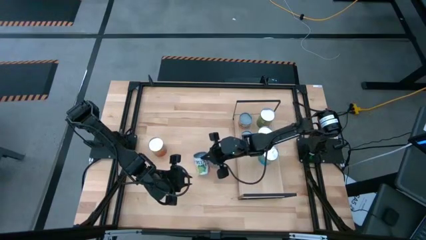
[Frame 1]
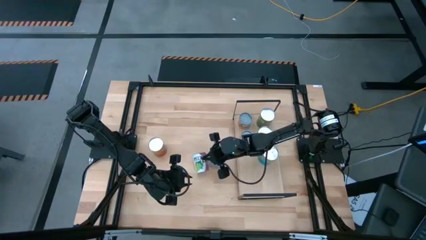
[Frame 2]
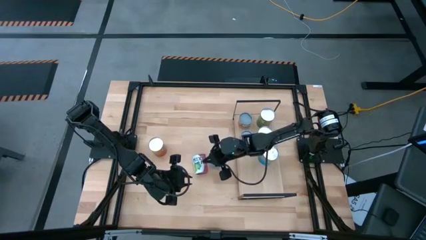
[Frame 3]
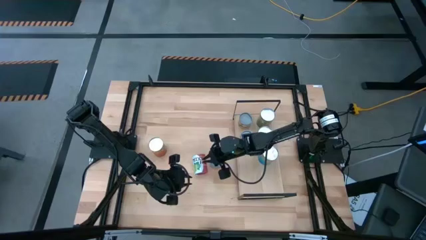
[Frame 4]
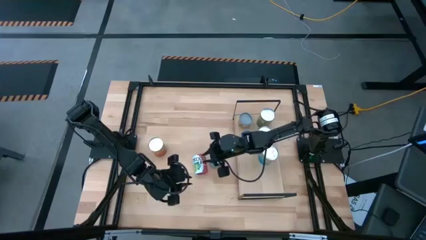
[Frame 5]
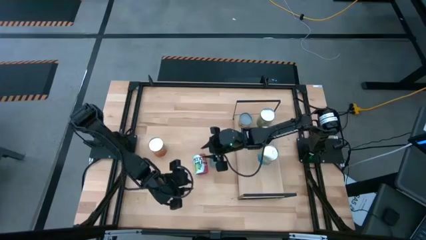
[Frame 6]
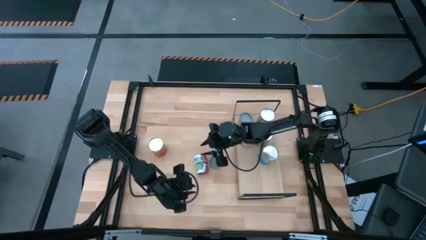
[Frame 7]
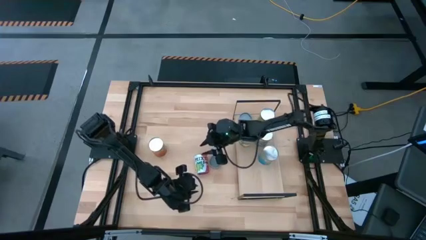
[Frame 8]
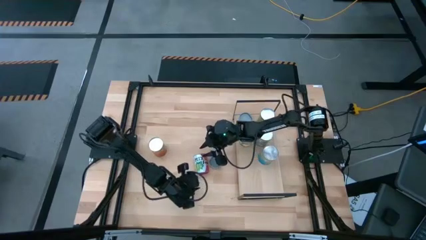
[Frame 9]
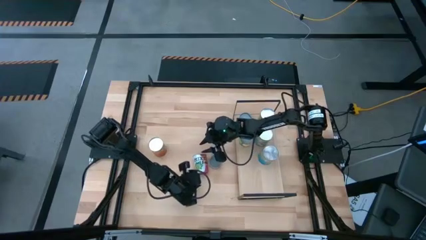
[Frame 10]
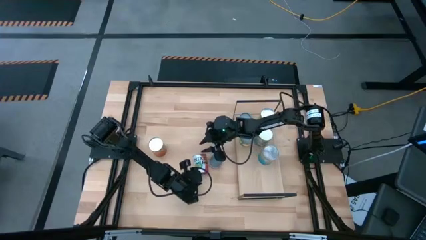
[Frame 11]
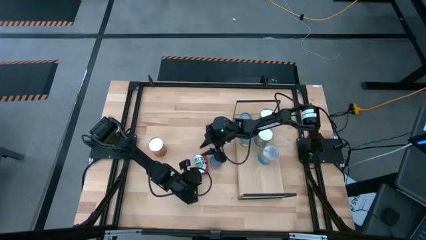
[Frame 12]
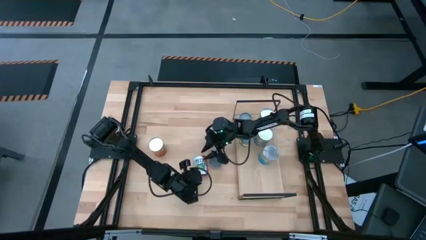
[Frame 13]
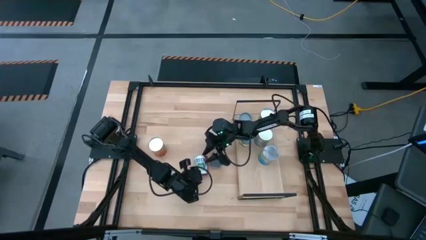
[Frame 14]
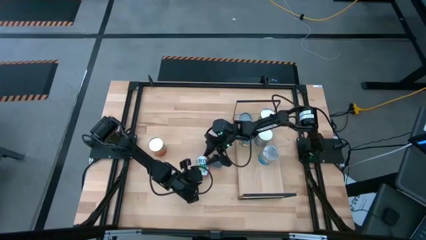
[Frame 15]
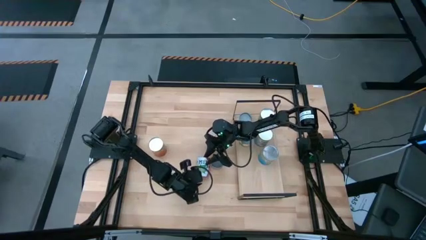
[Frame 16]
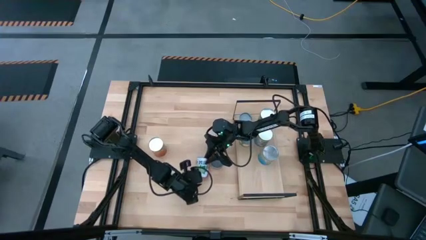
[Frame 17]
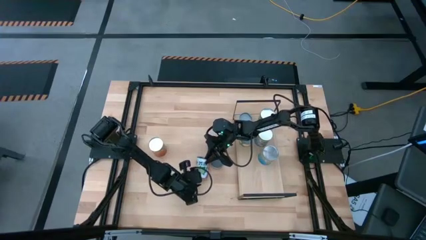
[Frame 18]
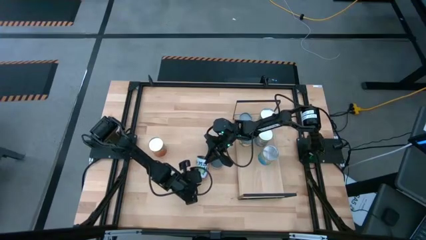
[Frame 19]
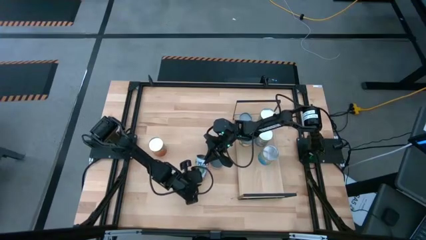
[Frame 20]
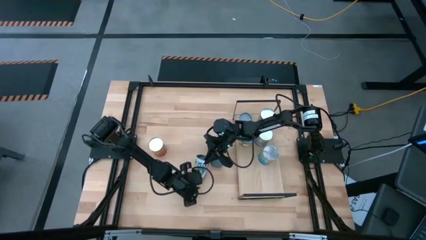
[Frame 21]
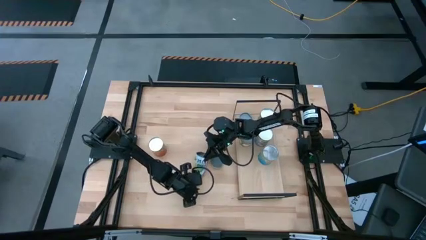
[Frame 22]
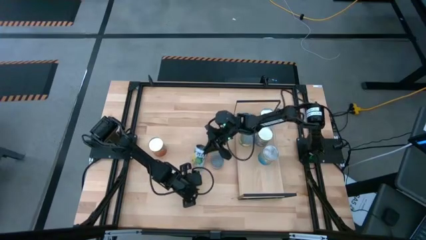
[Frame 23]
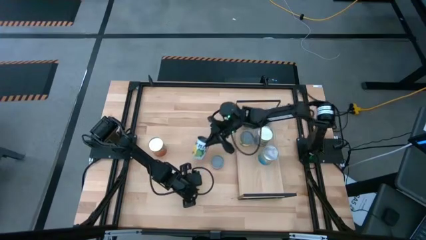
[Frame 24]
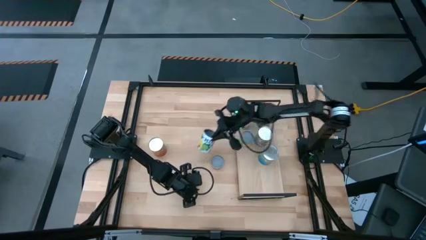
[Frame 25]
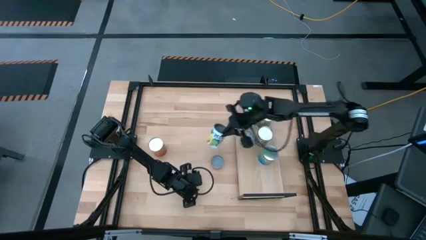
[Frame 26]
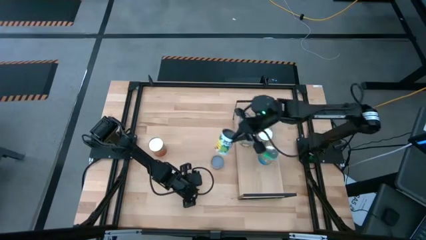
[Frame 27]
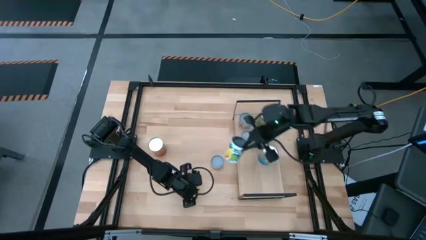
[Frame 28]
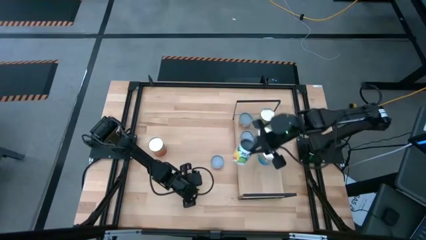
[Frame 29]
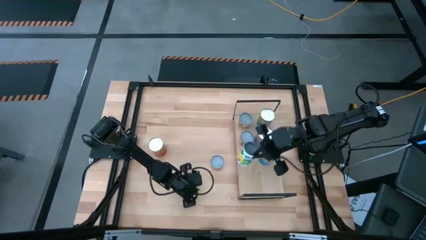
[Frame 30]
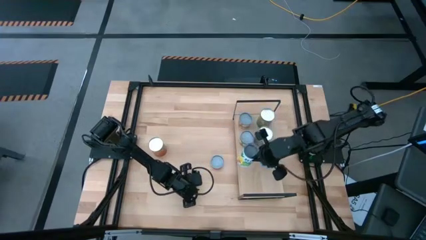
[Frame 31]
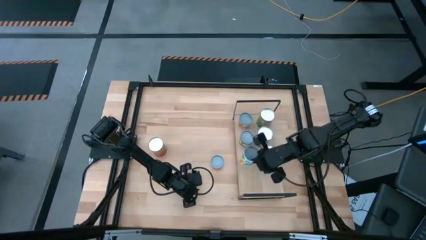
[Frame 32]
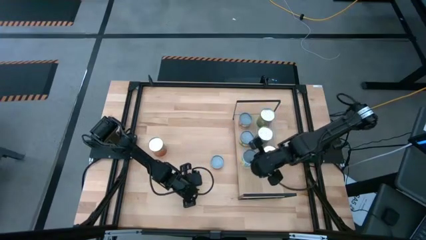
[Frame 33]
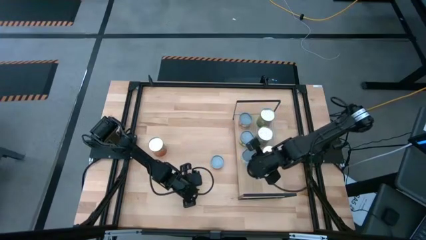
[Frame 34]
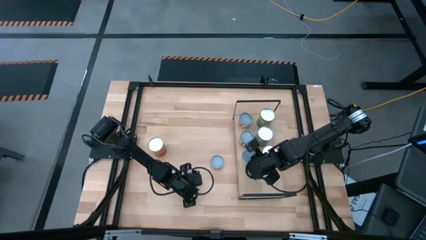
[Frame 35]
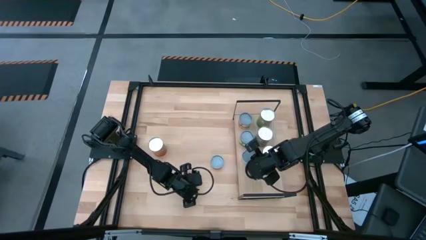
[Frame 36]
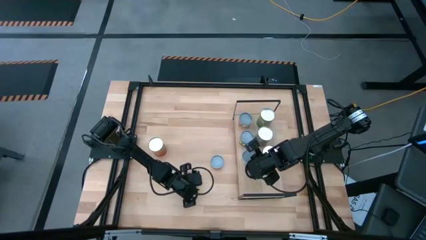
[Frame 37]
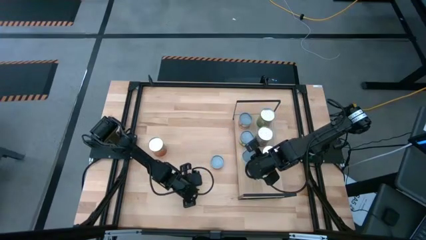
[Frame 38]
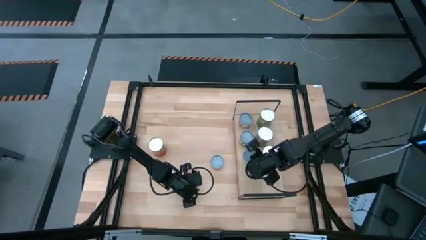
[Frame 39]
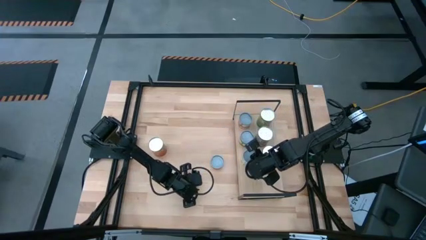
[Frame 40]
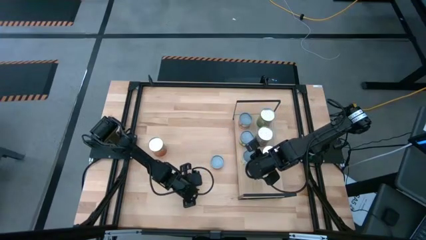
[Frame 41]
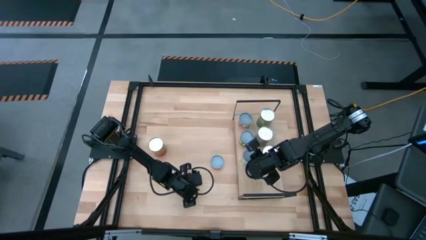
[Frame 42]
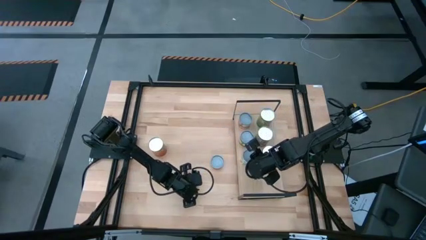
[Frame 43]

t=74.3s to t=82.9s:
Task: Pick and place cans onto a shelf
Put the canned mixed fruits on the shelf

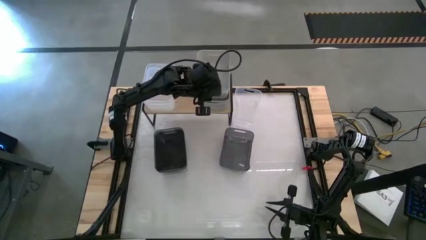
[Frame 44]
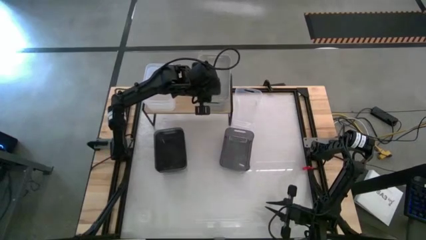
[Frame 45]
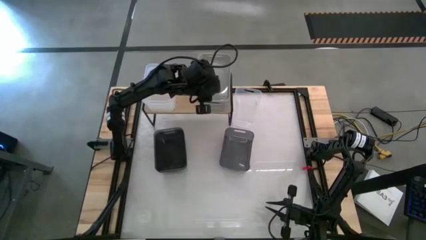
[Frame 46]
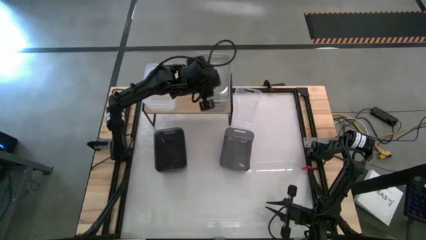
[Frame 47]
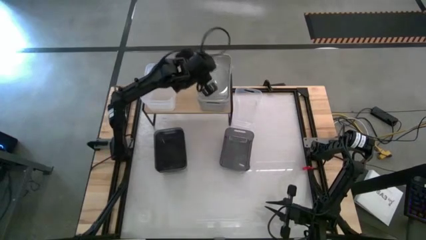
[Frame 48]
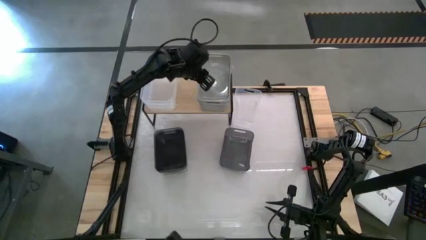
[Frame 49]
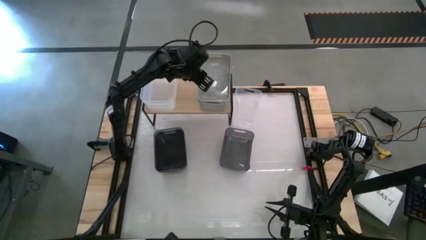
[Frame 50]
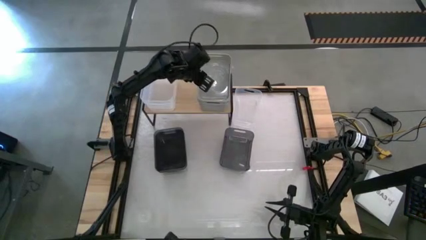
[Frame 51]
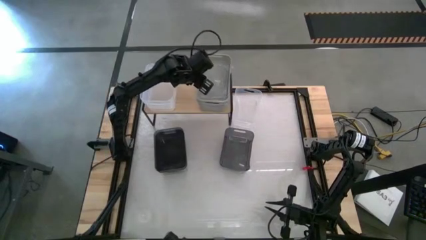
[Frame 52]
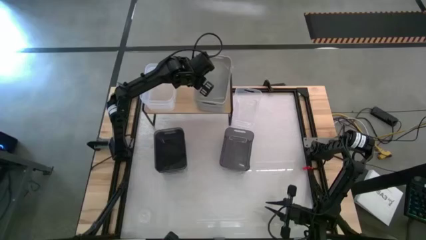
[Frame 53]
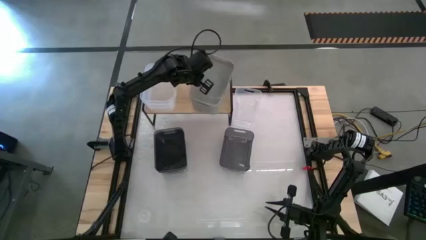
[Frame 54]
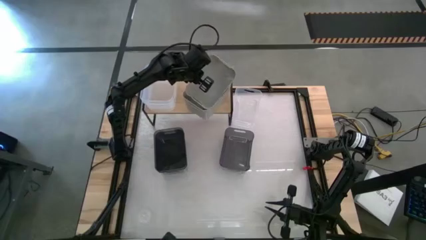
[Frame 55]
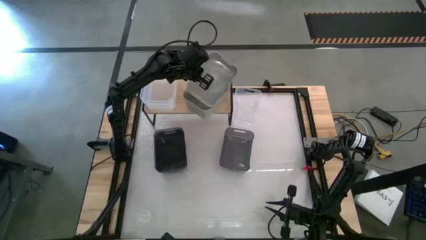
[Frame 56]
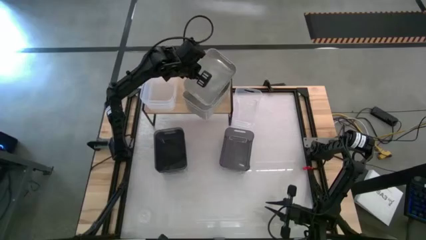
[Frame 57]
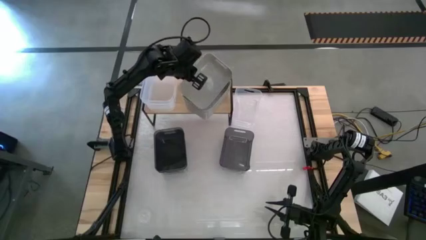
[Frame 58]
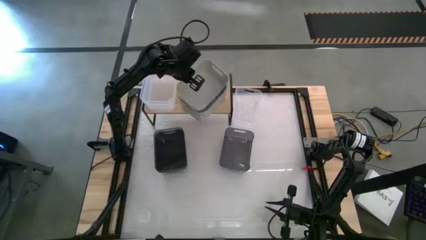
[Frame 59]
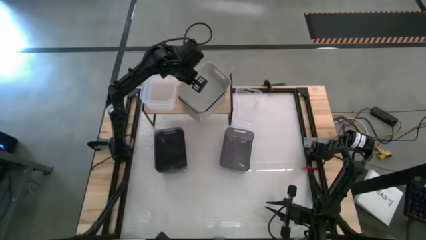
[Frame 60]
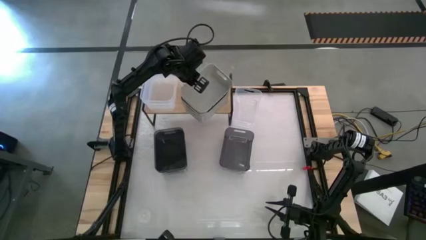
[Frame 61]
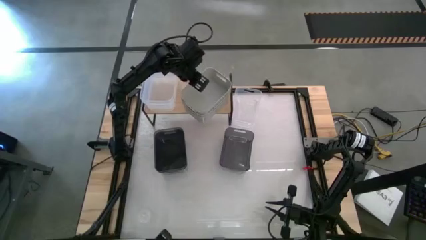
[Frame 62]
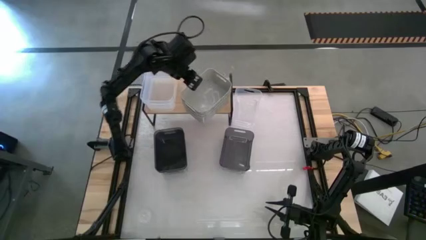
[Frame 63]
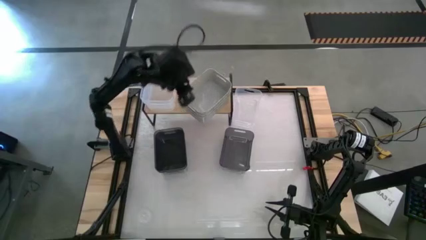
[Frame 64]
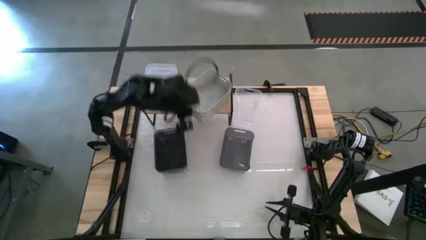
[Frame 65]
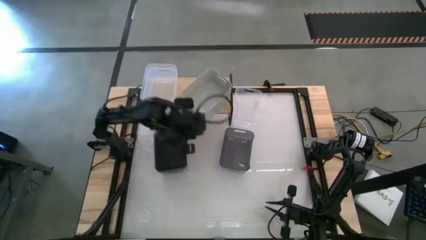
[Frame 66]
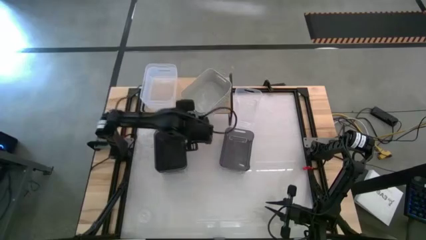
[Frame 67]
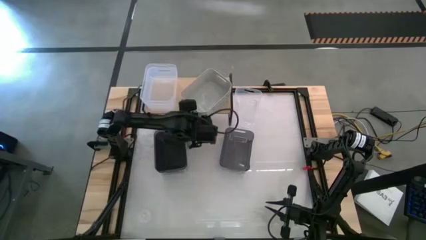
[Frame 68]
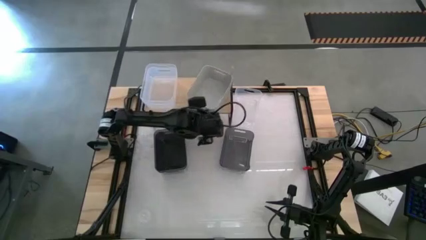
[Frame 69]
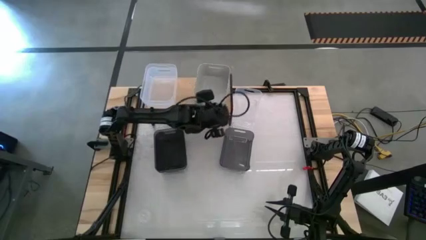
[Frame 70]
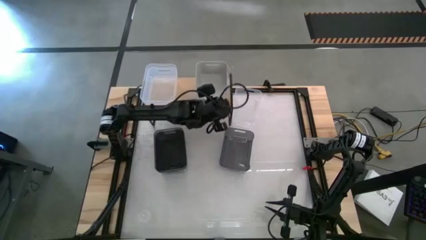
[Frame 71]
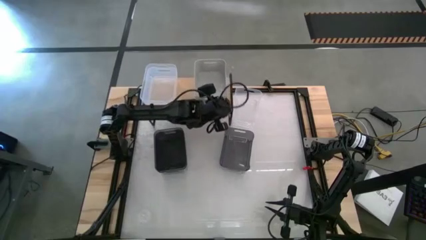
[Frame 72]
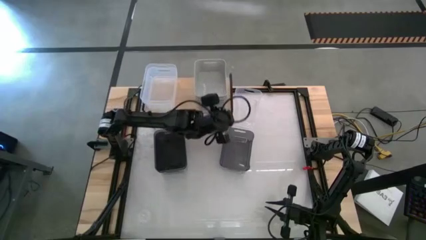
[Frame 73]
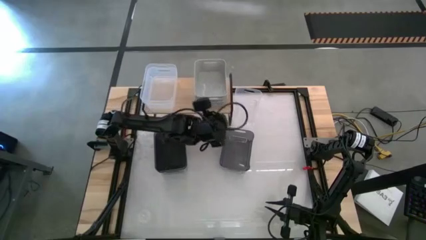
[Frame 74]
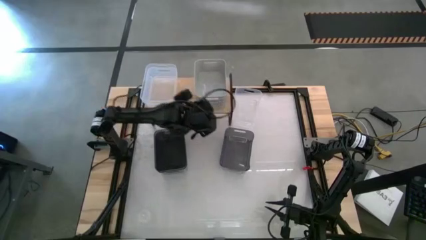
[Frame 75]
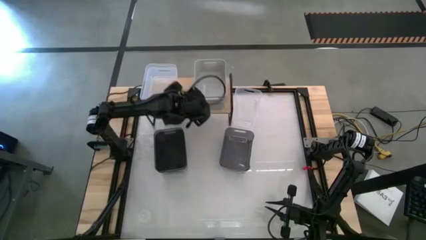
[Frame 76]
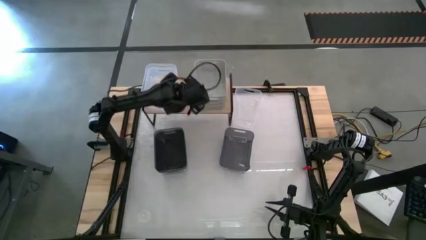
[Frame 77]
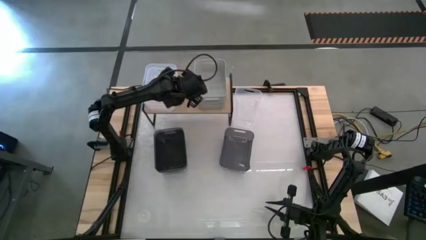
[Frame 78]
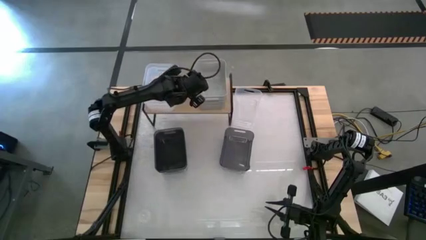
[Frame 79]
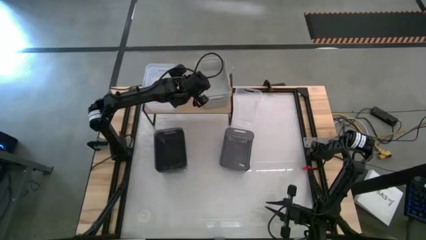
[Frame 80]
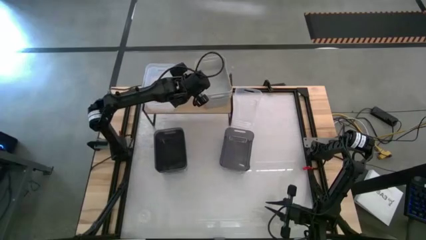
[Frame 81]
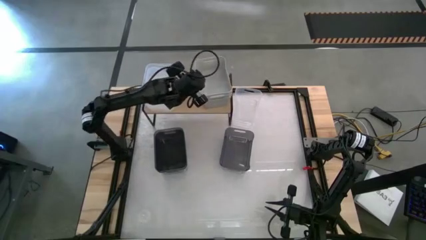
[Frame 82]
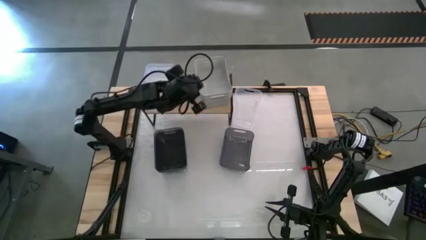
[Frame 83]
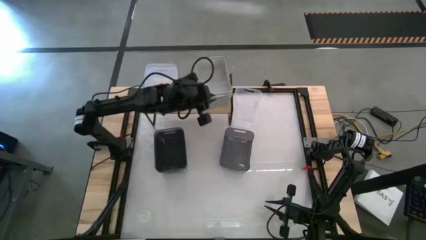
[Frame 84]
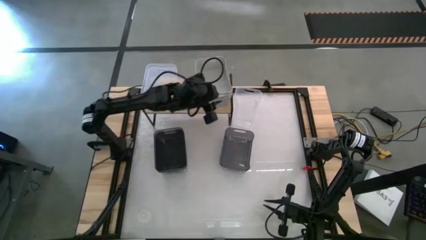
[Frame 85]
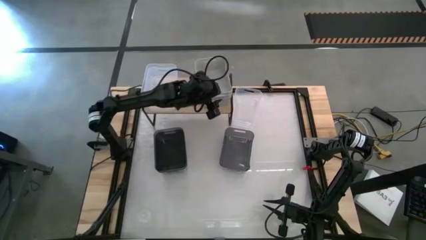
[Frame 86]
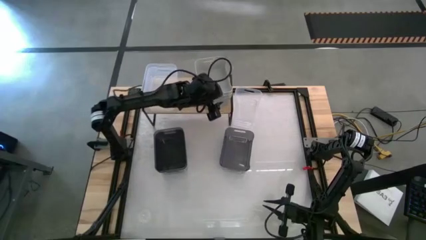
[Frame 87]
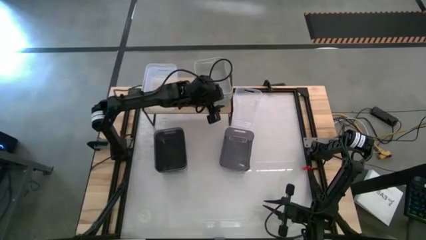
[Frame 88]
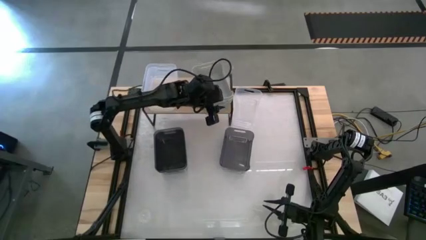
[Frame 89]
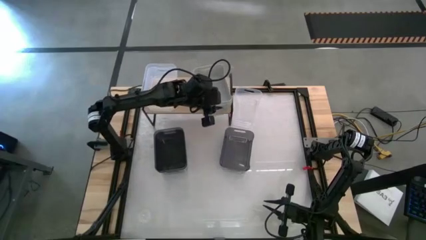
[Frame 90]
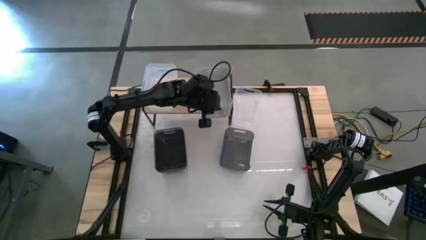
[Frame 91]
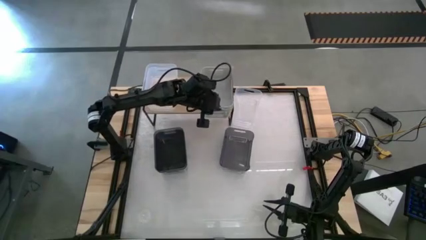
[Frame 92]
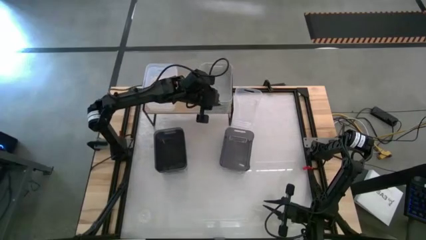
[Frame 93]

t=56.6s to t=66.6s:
Task: Stack baskets on shelf by color
Stack the gray bin on top of the gray bin on the shelf
